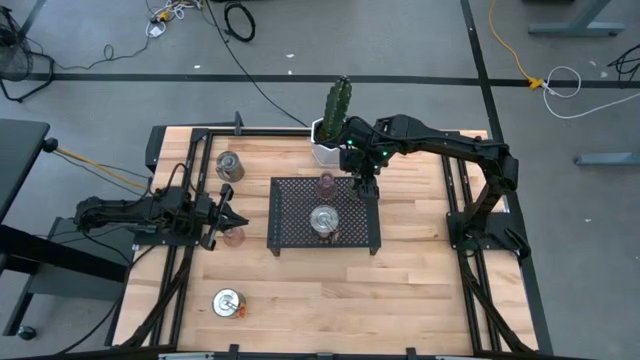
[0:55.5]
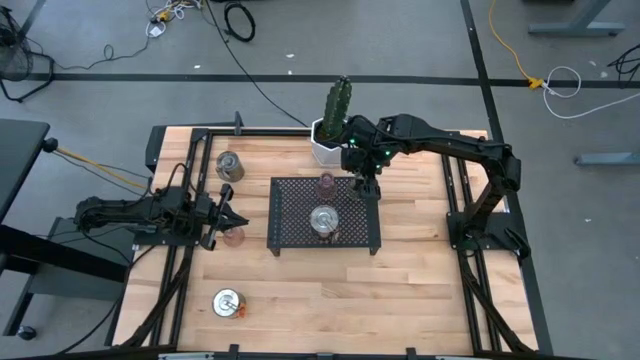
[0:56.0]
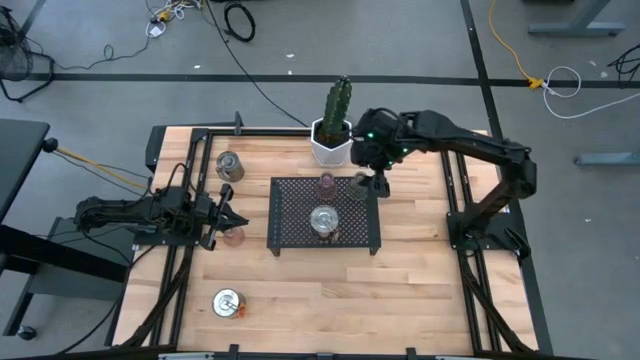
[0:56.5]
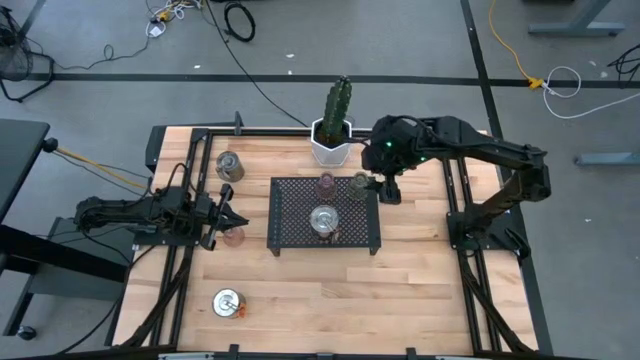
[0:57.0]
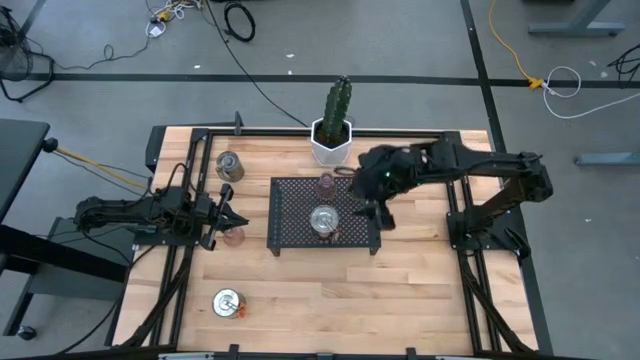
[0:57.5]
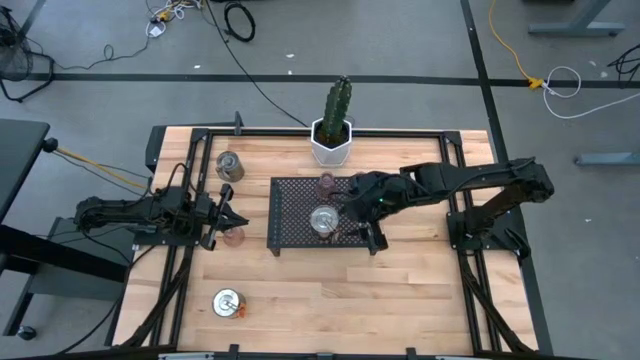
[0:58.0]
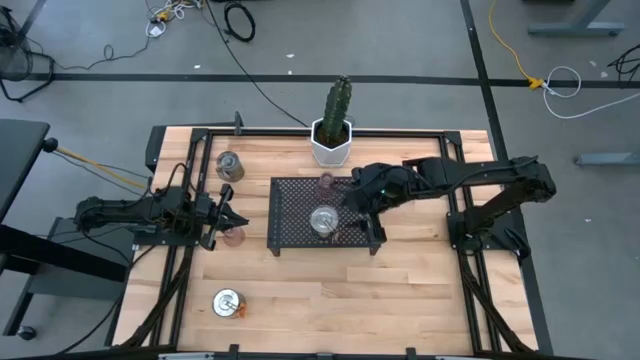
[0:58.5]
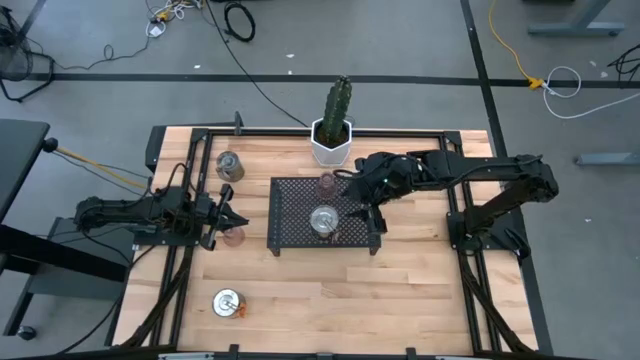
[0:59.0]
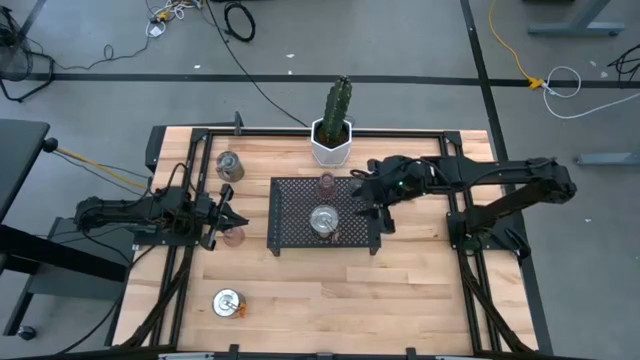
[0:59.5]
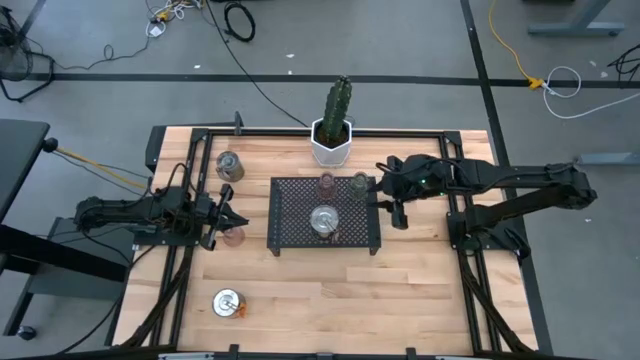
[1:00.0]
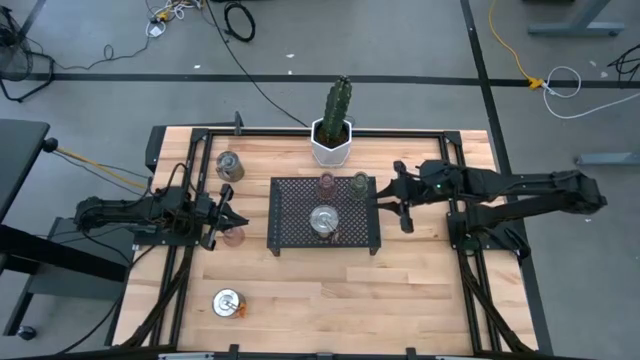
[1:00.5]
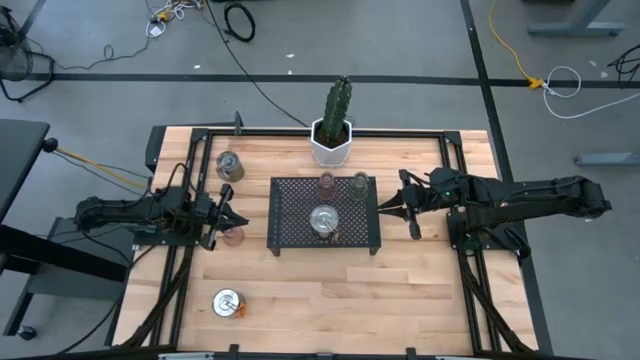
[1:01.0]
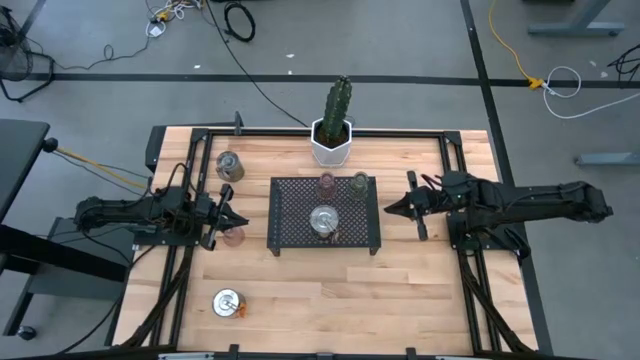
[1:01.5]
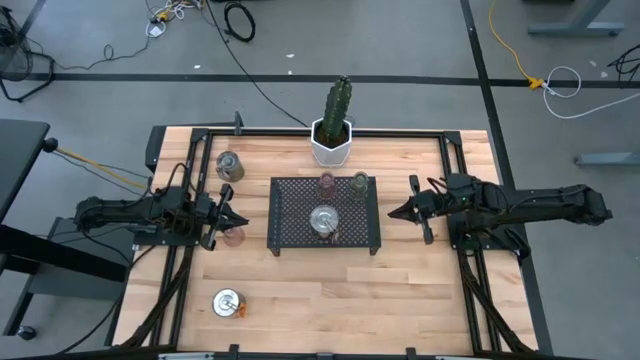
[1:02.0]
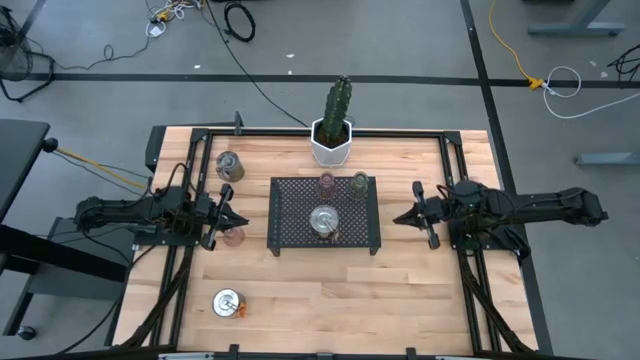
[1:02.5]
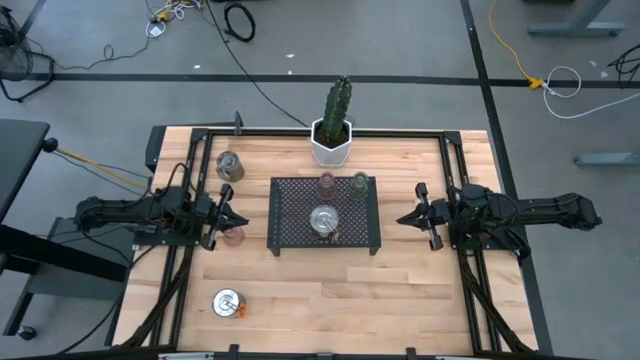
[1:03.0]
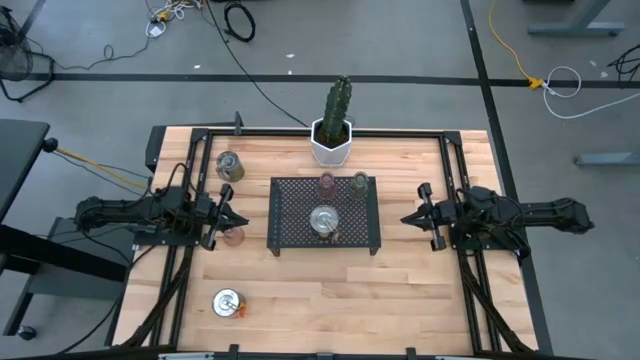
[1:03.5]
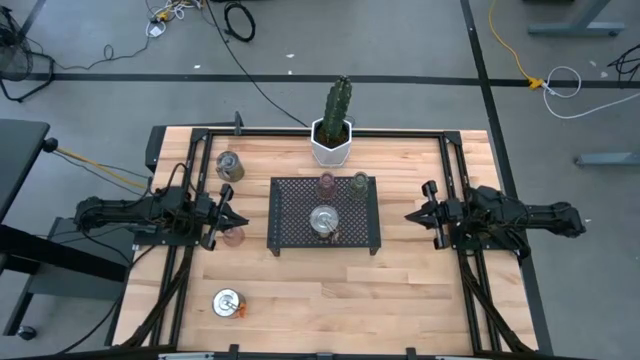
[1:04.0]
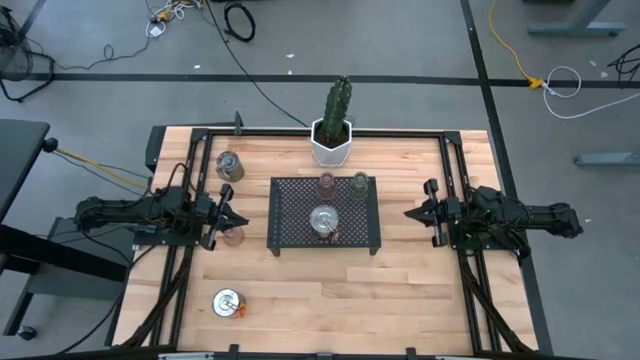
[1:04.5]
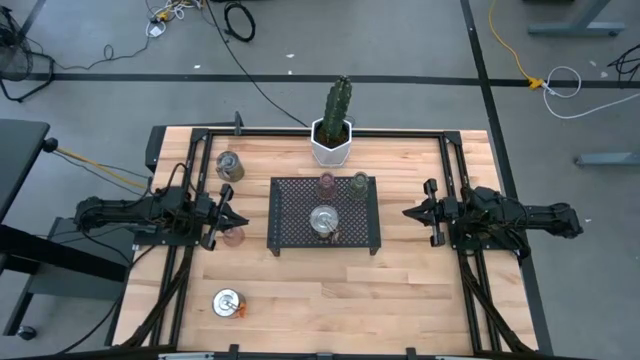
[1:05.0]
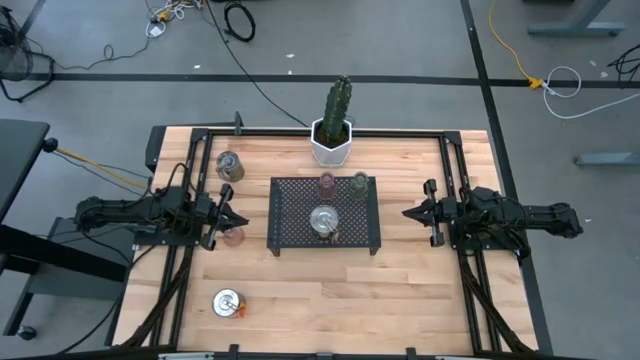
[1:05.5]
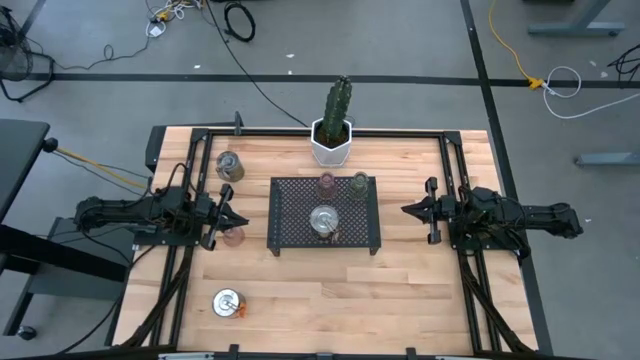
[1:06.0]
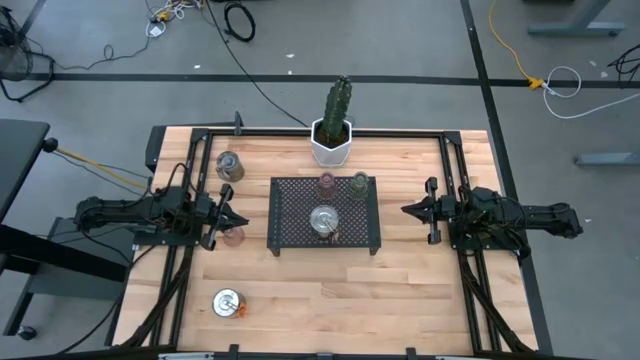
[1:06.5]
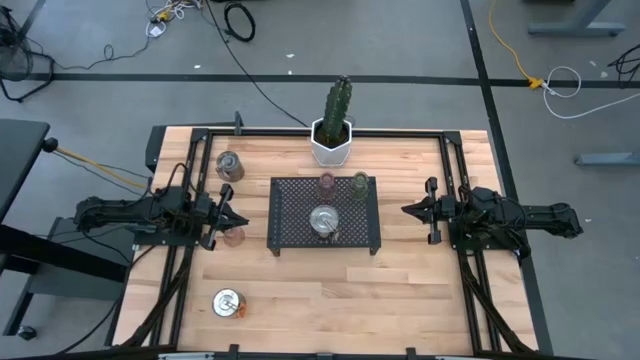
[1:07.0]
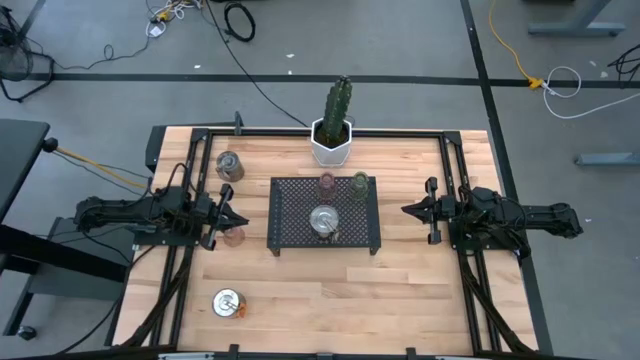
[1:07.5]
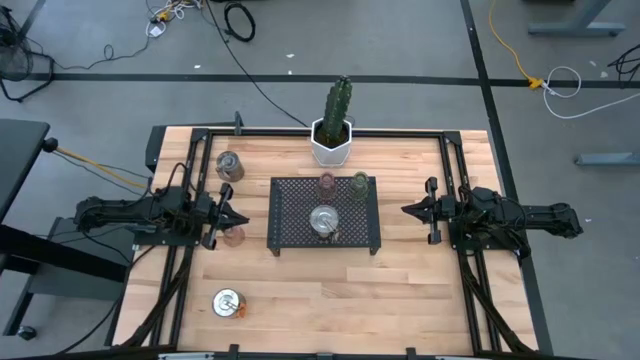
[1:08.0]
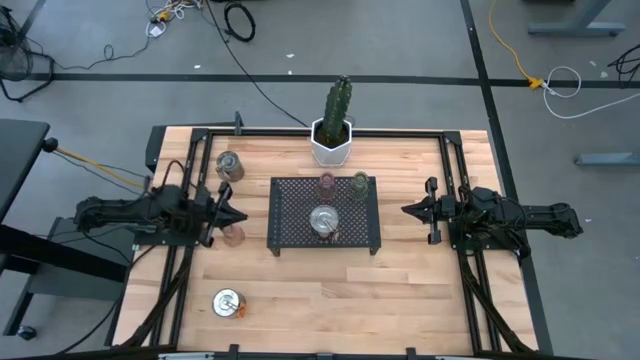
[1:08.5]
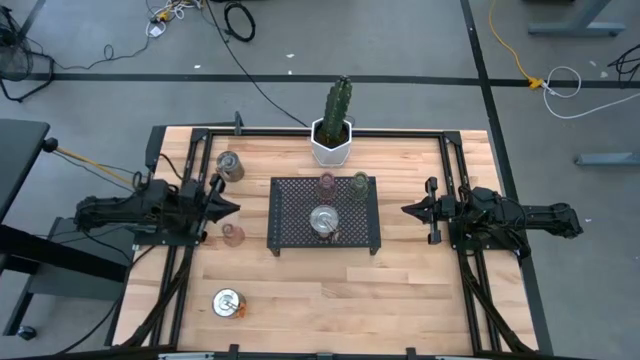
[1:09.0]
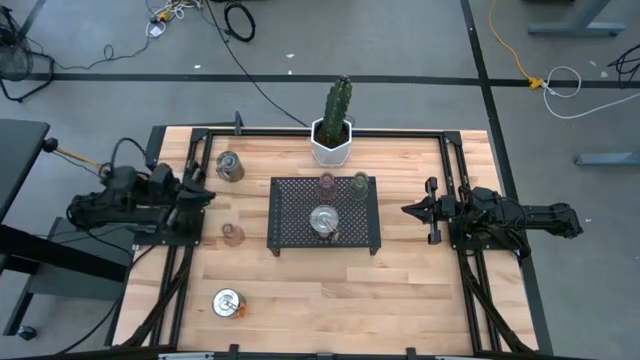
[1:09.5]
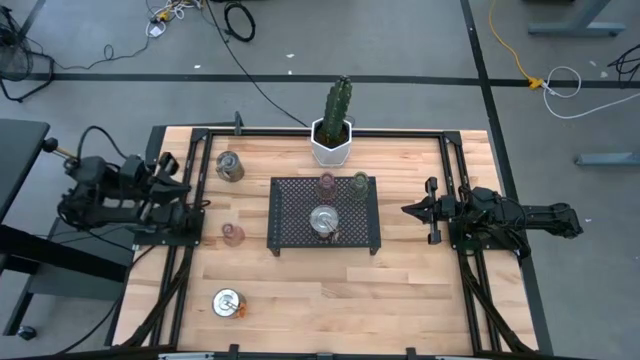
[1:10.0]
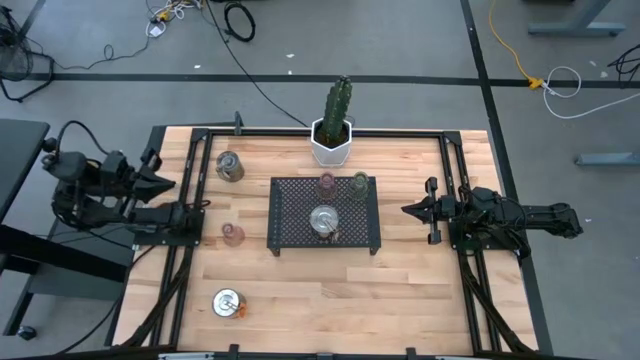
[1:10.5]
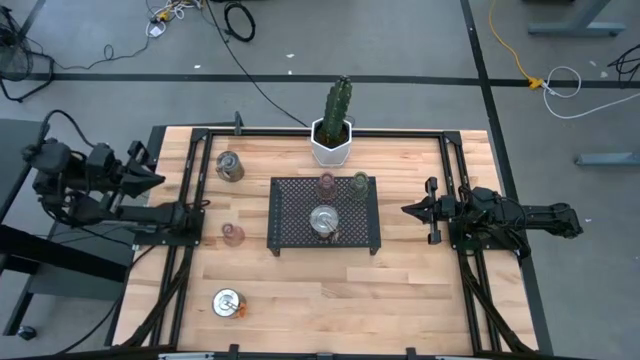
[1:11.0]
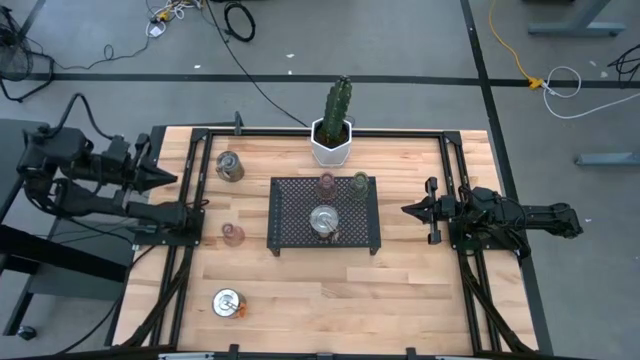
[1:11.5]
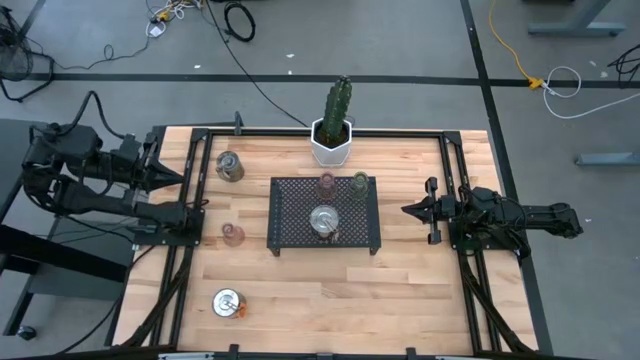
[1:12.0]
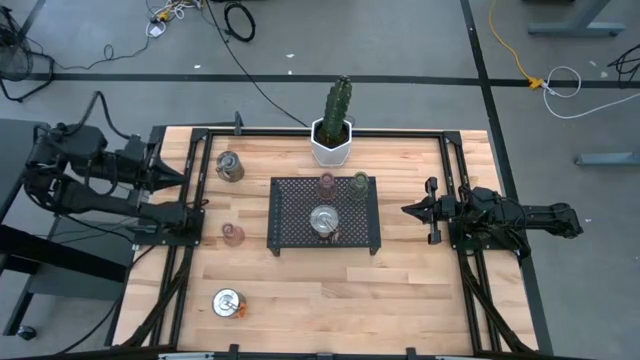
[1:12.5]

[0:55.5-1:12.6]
Task: Pick & Place candle stick holders
Put the purple glass candle holder on the shelf
